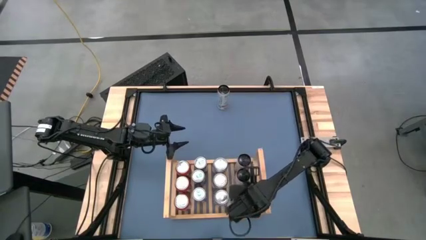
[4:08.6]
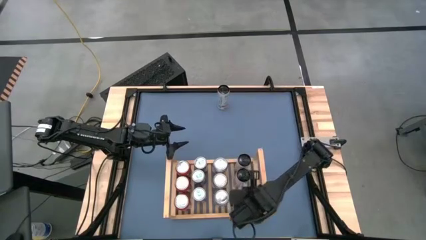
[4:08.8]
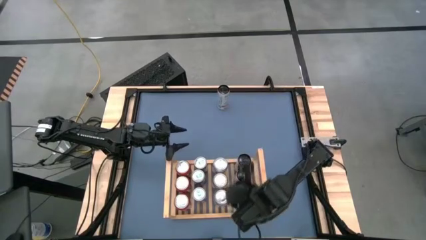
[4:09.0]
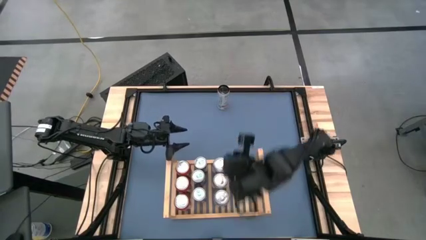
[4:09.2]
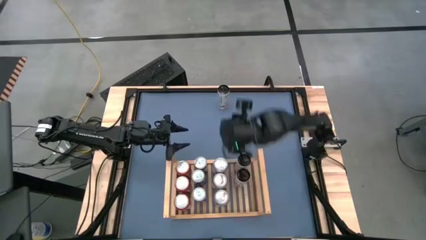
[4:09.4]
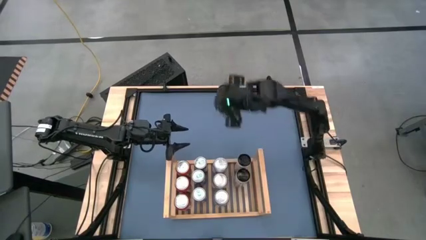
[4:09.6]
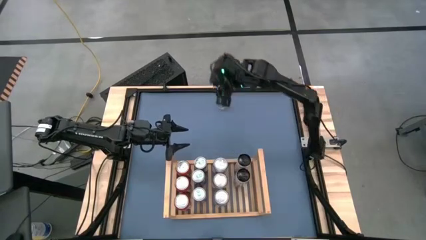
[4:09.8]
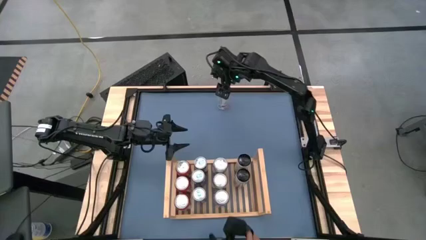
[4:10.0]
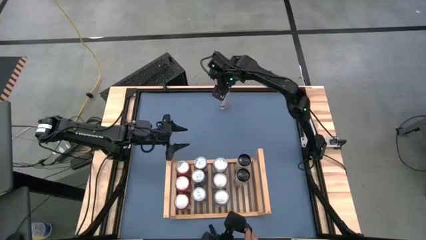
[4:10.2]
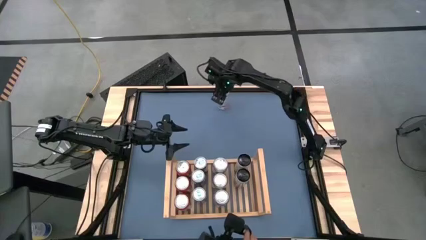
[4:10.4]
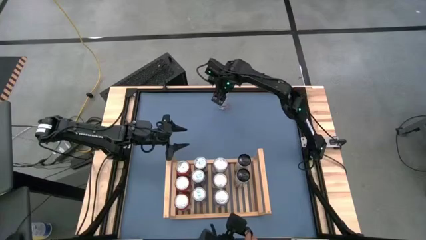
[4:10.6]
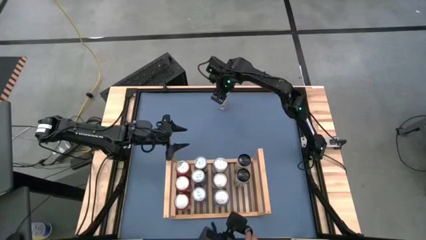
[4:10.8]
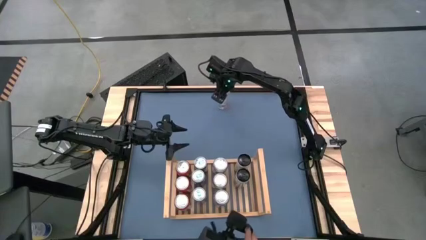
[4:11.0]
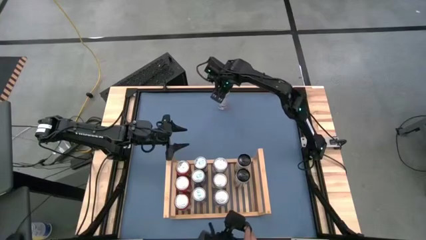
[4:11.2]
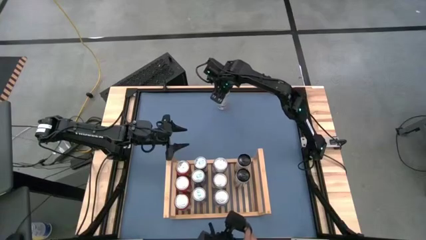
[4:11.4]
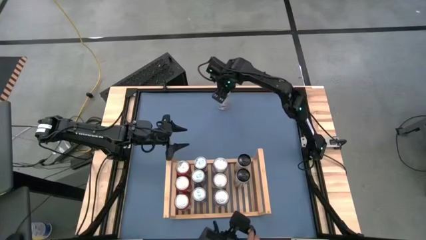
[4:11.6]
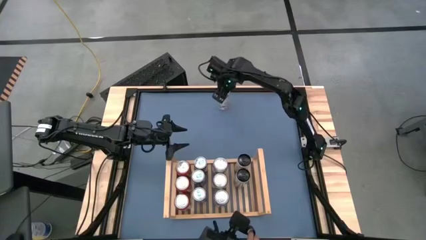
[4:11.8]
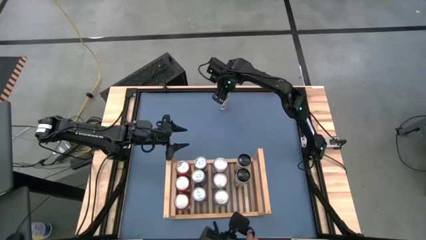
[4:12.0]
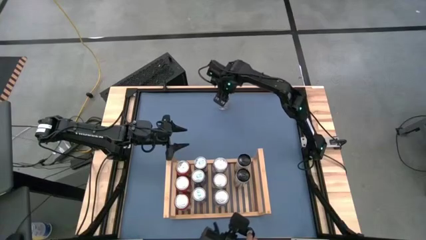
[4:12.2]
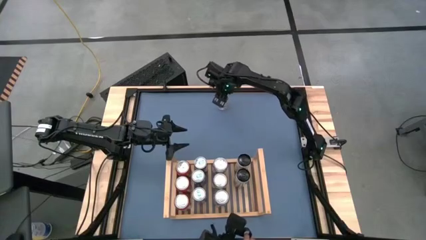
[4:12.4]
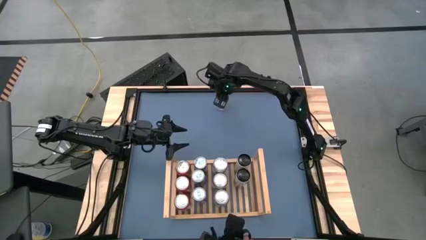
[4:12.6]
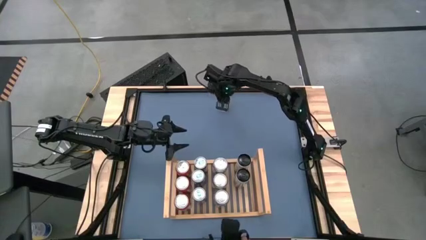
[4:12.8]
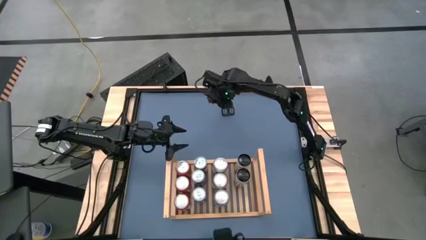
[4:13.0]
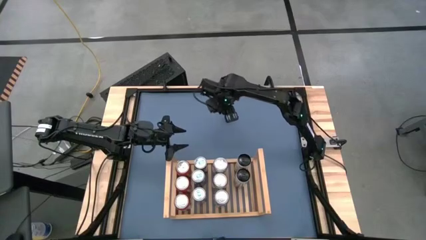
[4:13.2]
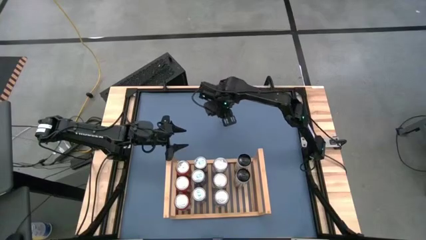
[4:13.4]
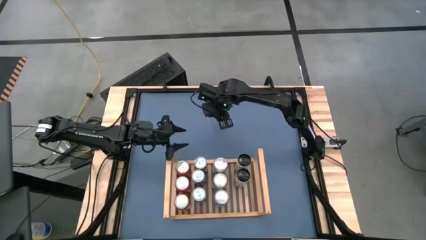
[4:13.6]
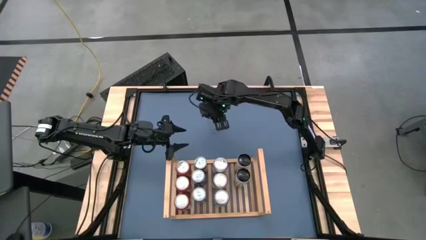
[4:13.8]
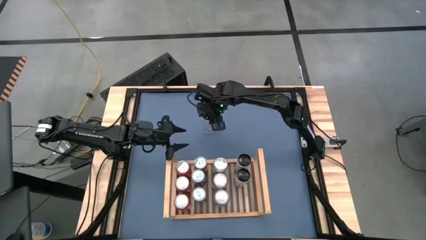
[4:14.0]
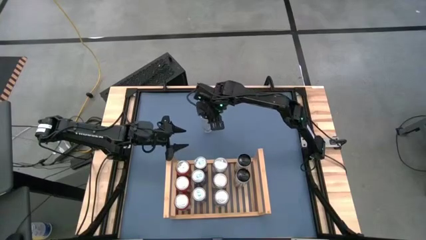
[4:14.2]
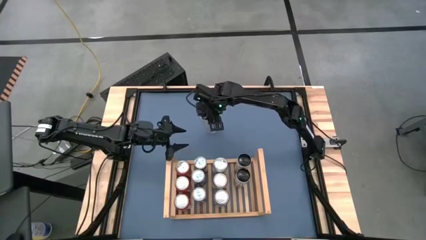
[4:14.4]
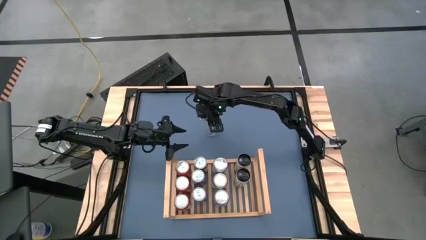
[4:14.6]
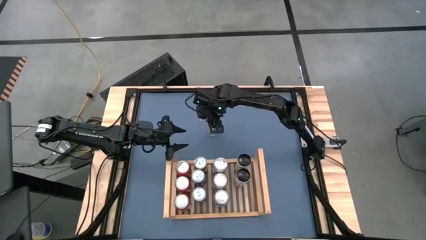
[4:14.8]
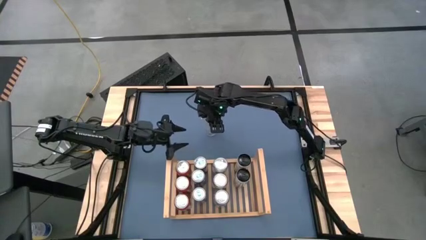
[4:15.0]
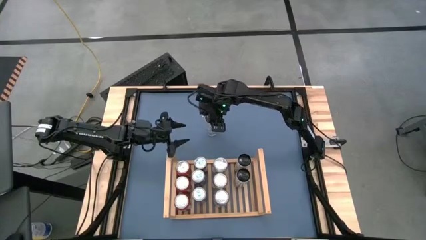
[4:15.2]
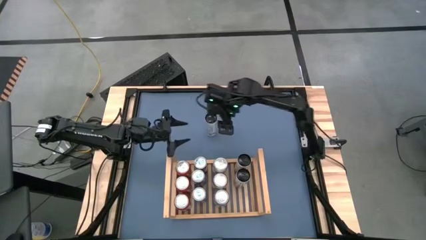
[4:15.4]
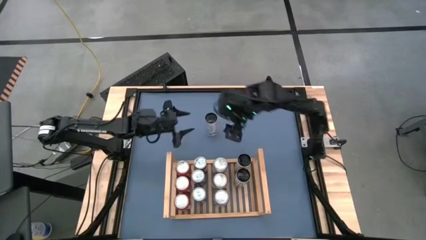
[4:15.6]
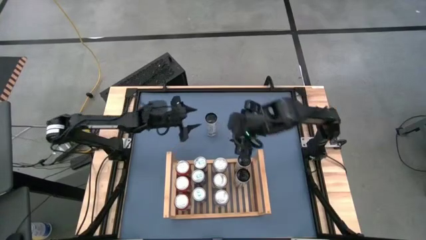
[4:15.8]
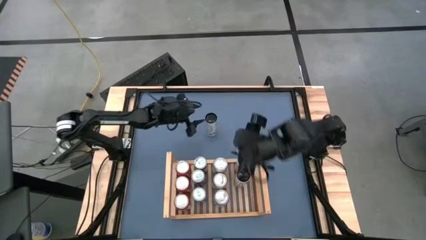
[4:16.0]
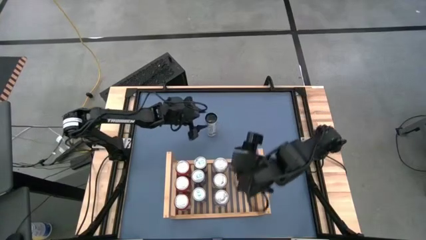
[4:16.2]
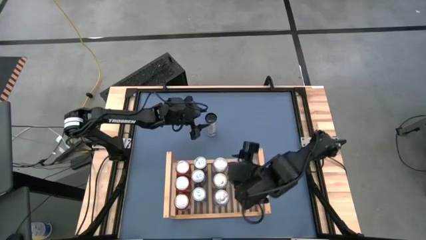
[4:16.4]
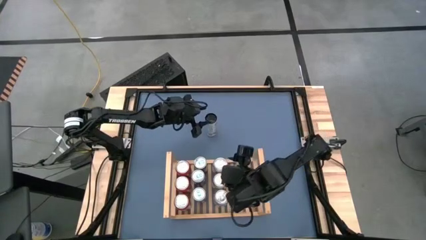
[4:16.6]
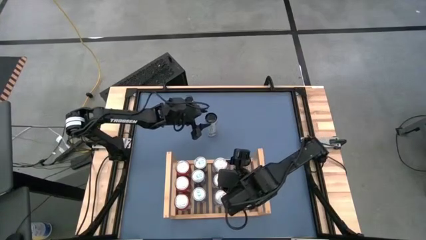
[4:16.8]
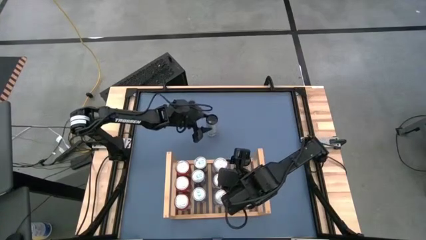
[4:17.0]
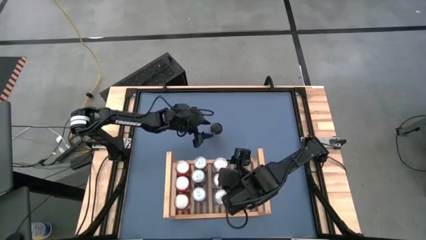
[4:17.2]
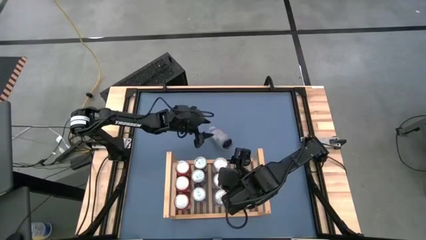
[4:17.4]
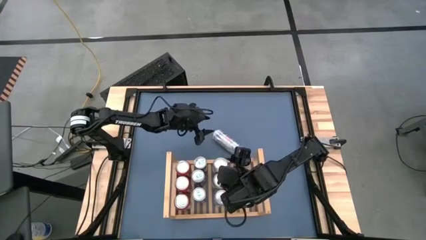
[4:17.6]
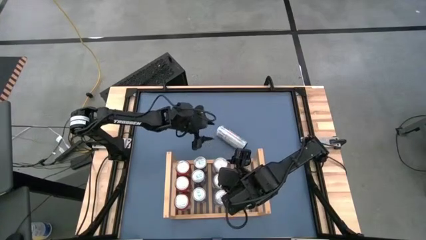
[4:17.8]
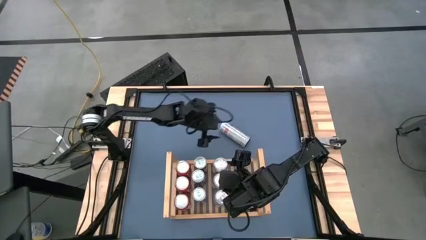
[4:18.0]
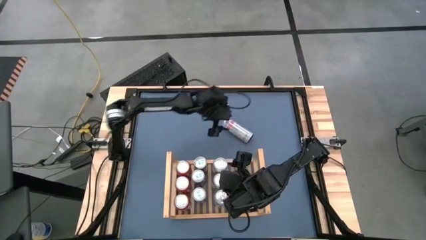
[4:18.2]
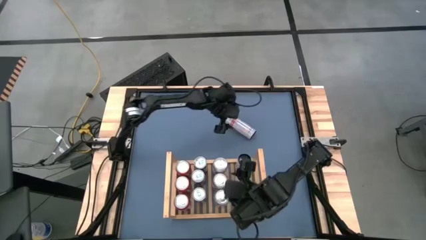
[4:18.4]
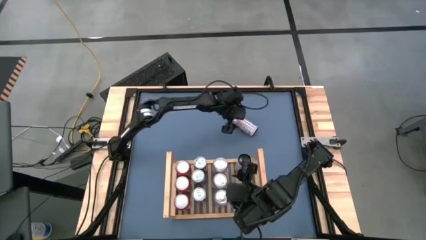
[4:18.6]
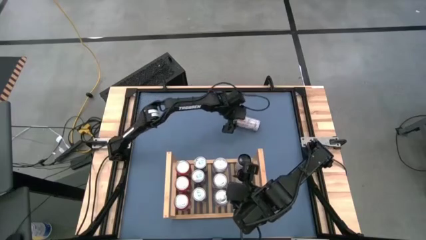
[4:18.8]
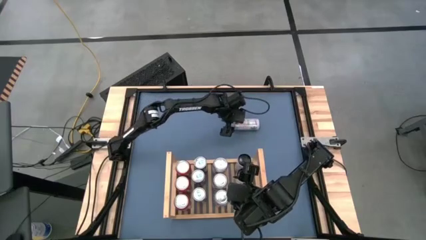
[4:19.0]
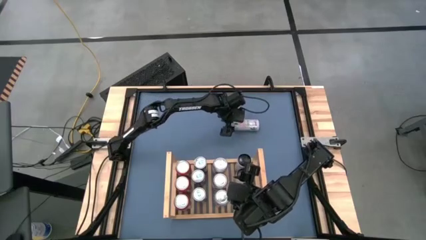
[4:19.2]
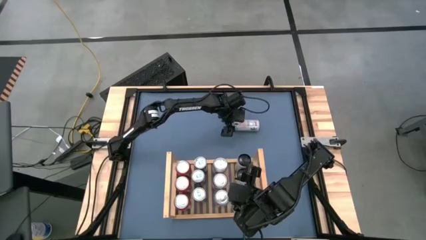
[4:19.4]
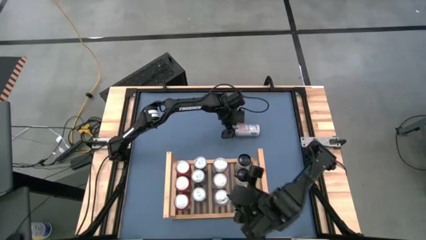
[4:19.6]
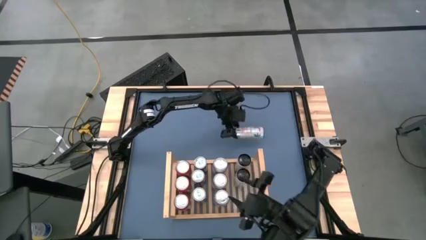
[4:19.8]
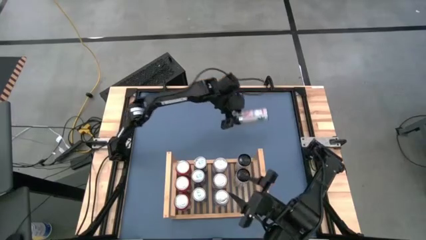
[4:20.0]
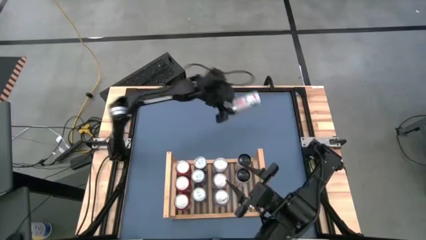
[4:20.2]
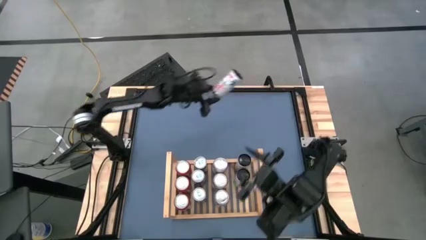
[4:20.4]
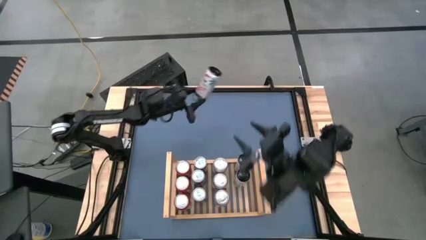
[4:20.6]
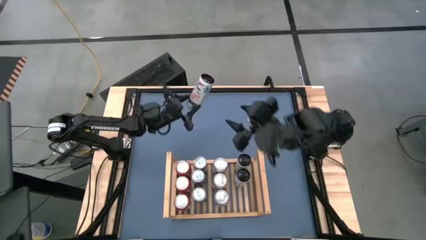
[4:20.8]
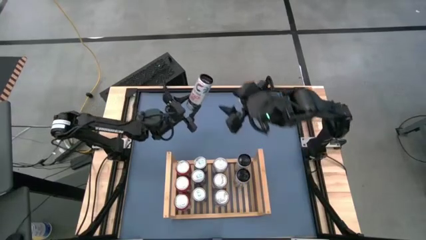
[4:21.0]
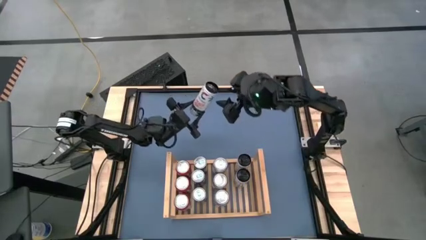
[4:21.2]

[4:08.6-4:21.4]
Task: Place canned beverage on shelf
Put the white-pink soda can on the shelf aligned with the other white-pink soda can
